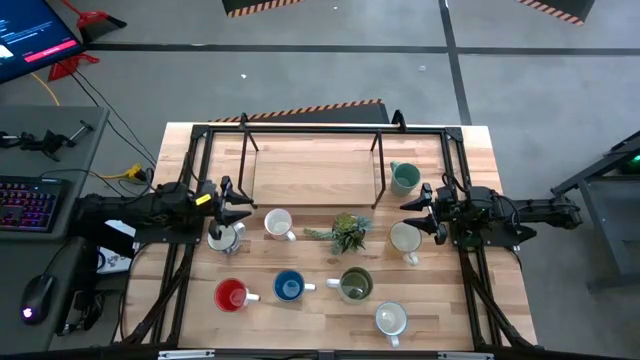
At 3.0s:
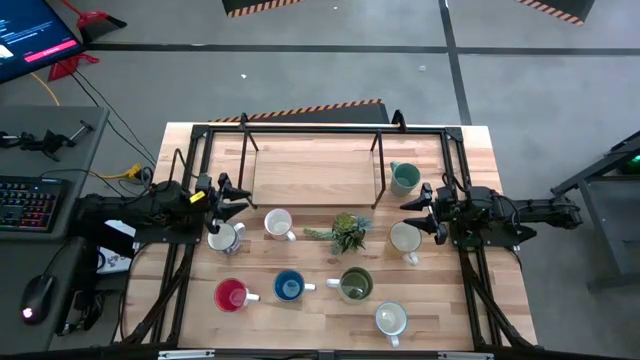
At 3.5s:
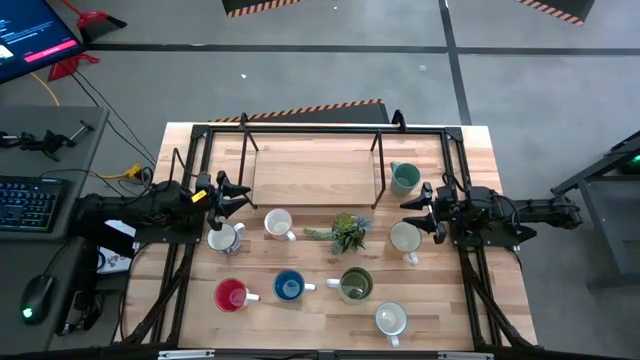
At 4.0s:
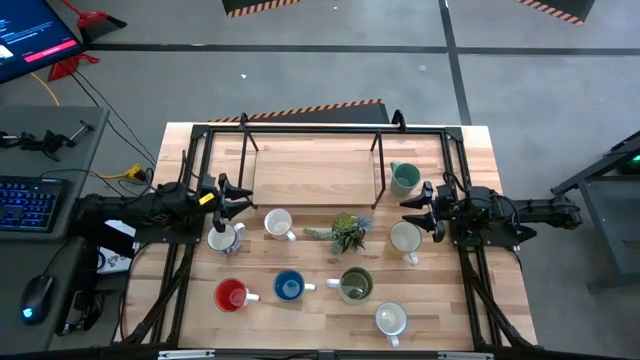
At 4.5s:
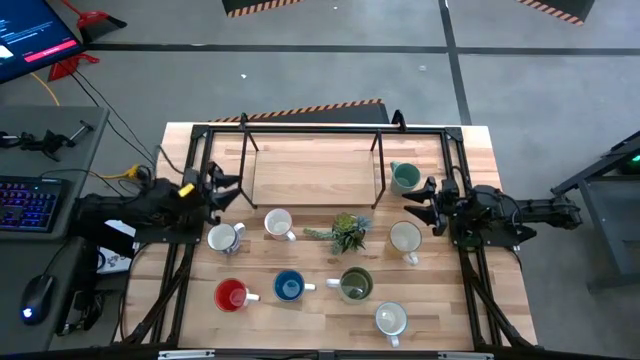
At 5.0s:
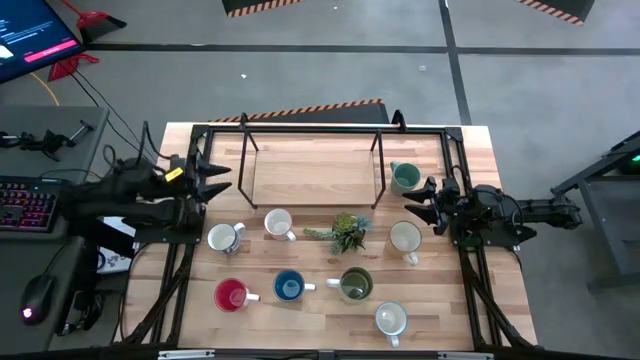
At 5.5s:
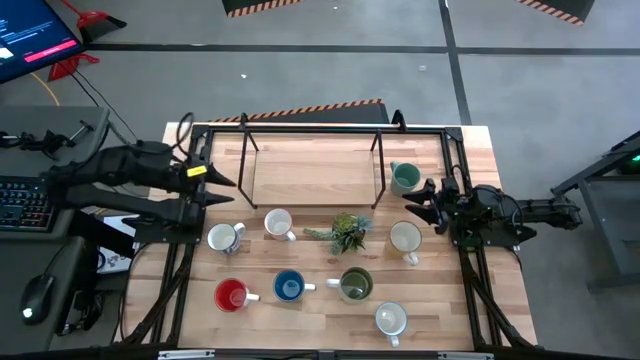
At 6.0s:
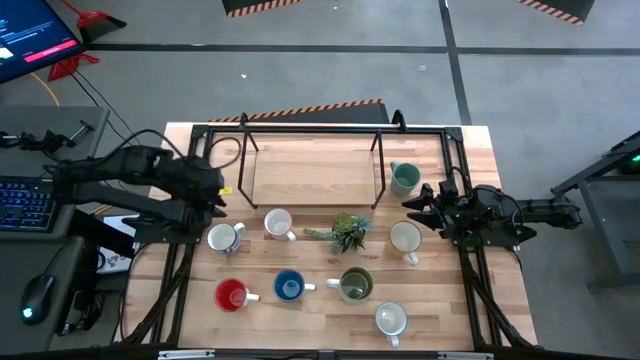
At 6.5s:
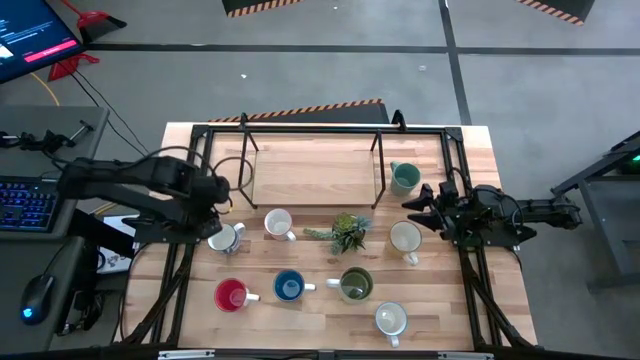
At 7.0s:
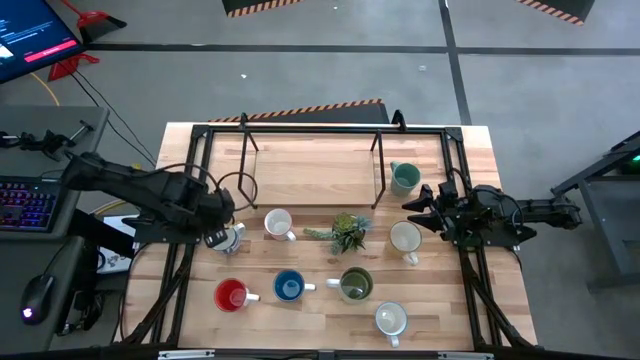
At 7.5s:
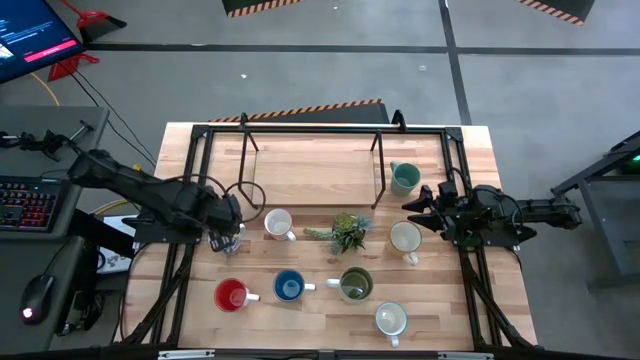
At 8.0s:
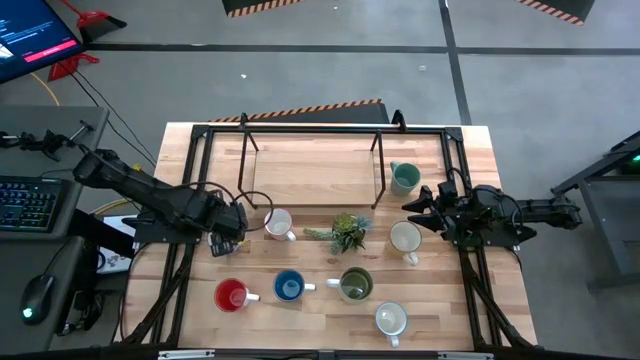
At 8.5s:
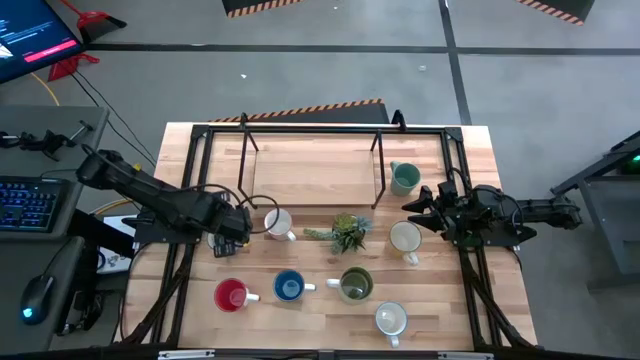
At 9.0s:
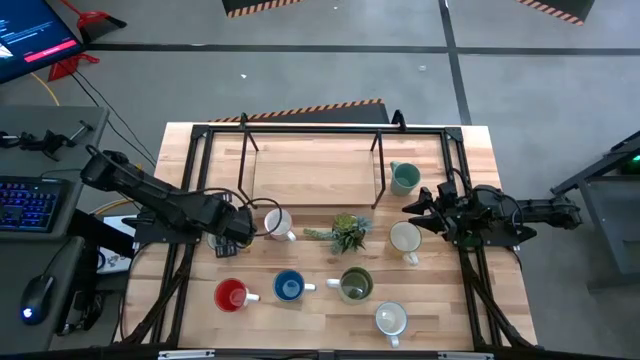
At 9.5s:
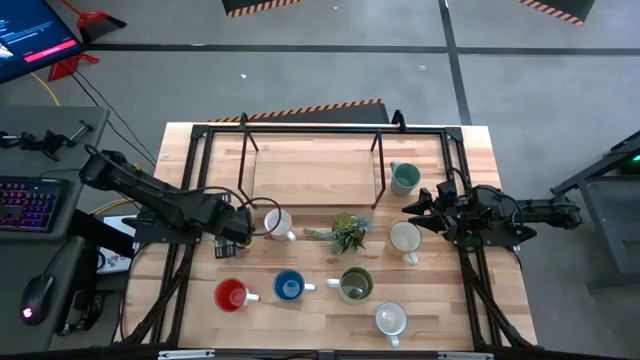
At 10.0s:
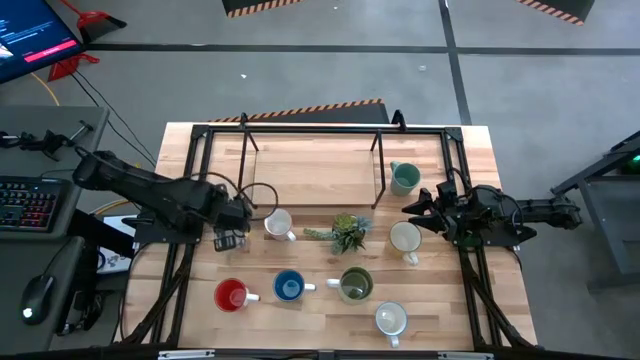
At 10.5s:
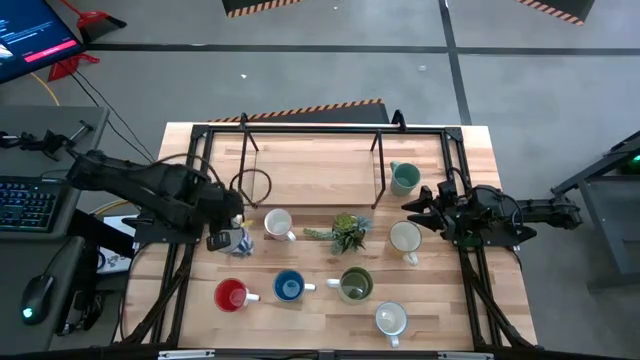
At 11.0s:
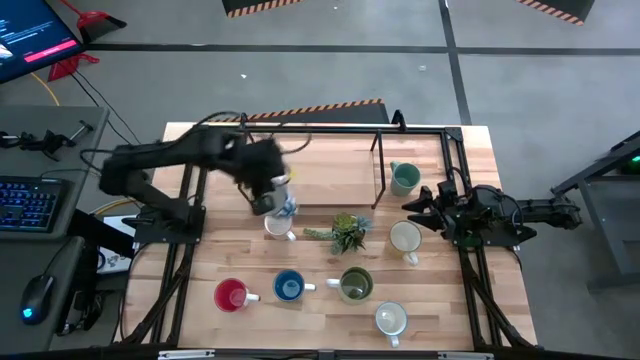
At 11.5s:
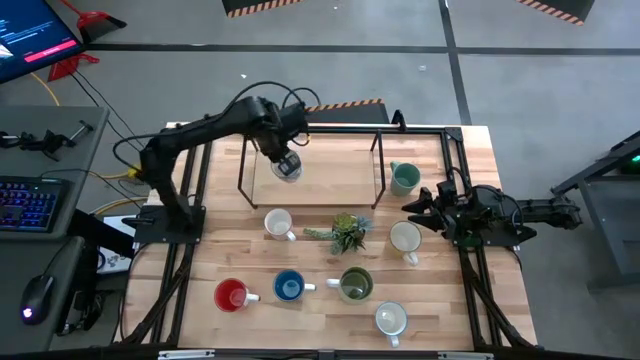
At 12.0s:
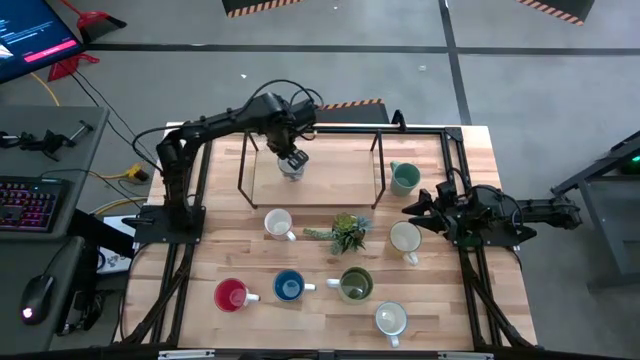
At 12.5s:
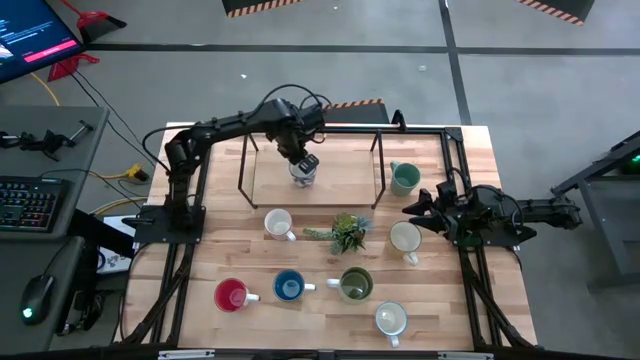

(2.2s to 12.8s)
Task: Place coffee mugs
Put the blue patterned mug on the shelf

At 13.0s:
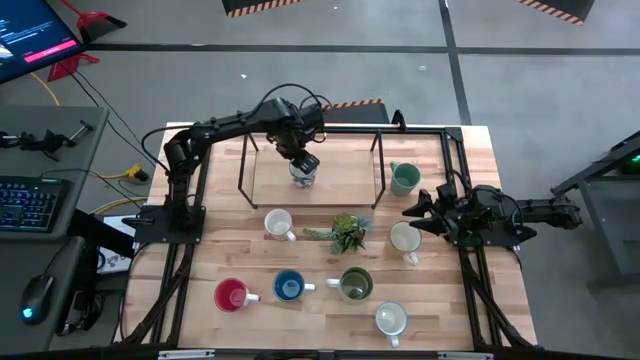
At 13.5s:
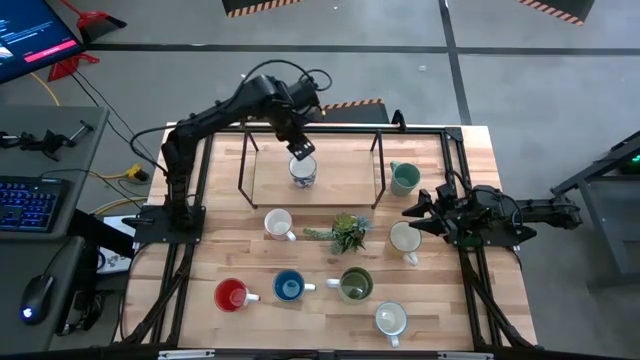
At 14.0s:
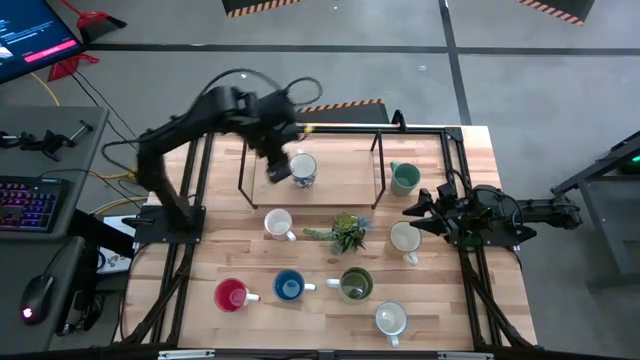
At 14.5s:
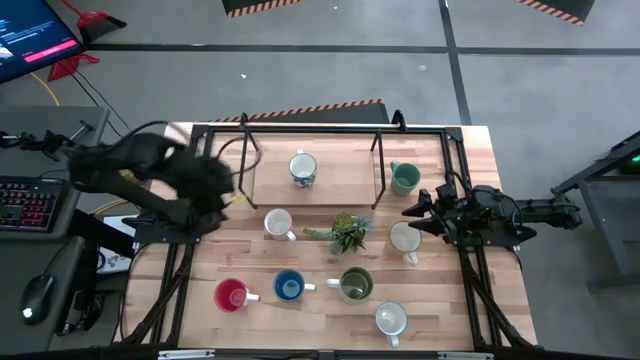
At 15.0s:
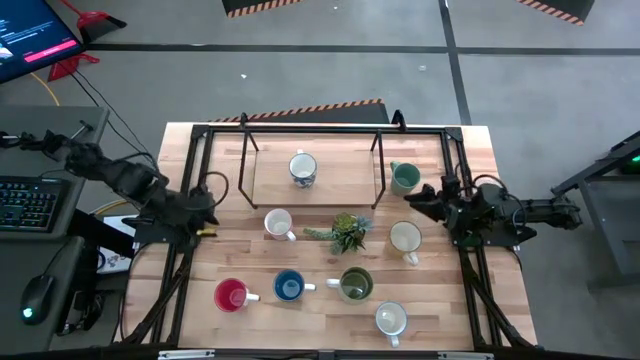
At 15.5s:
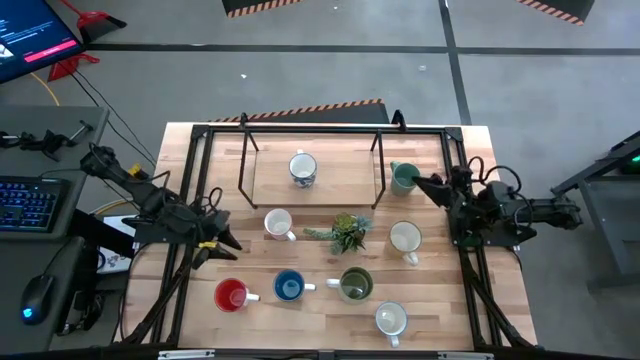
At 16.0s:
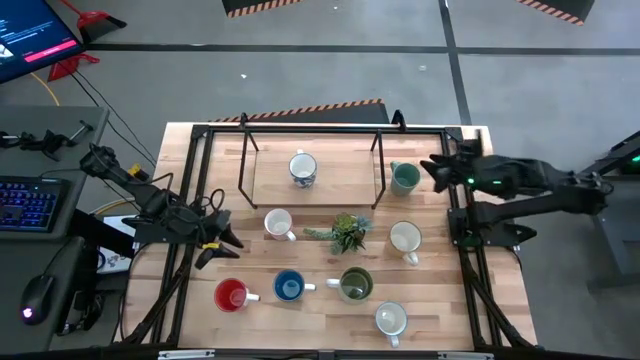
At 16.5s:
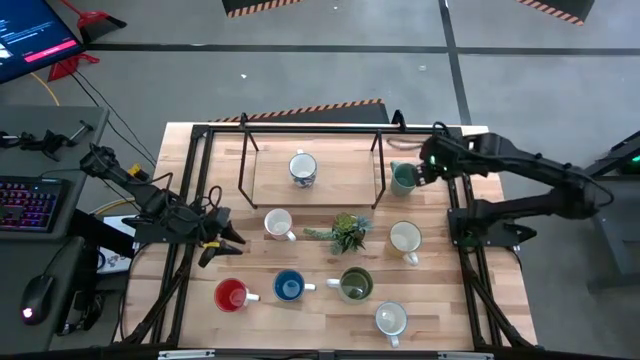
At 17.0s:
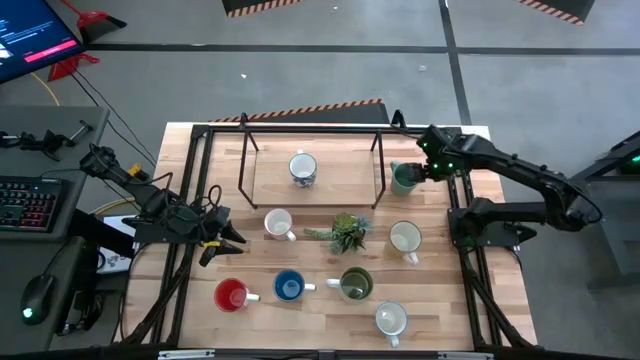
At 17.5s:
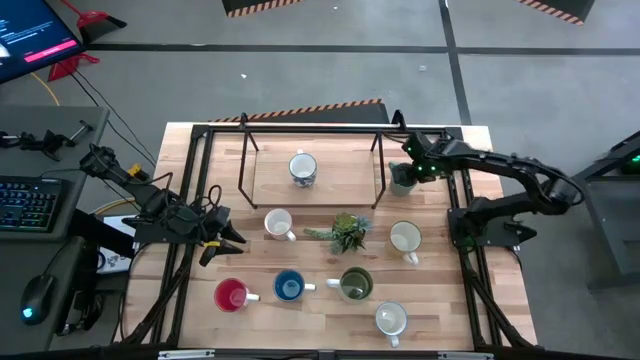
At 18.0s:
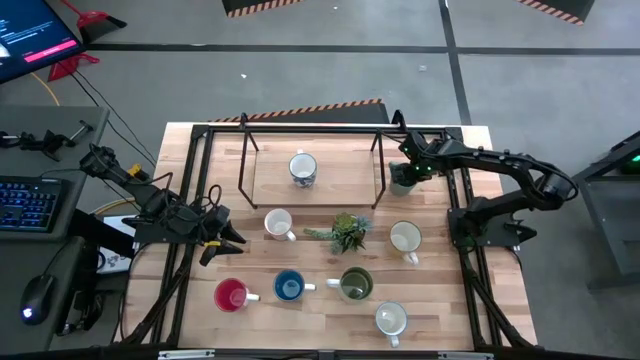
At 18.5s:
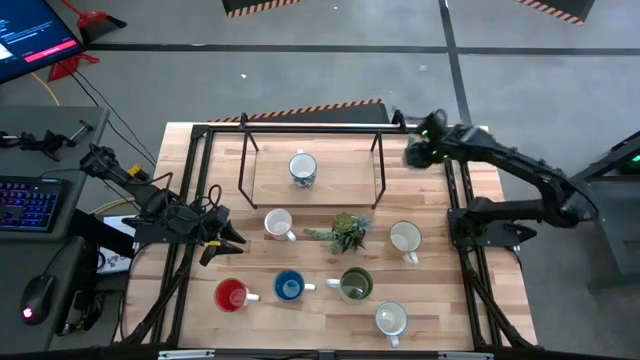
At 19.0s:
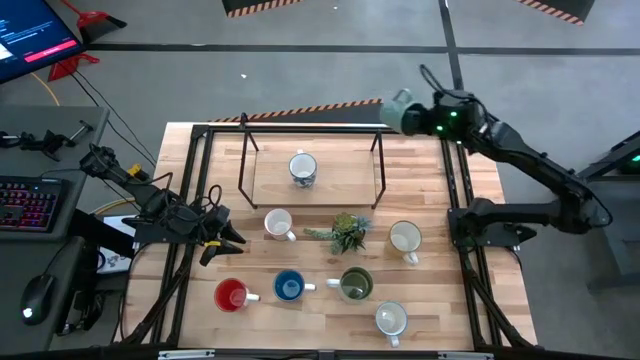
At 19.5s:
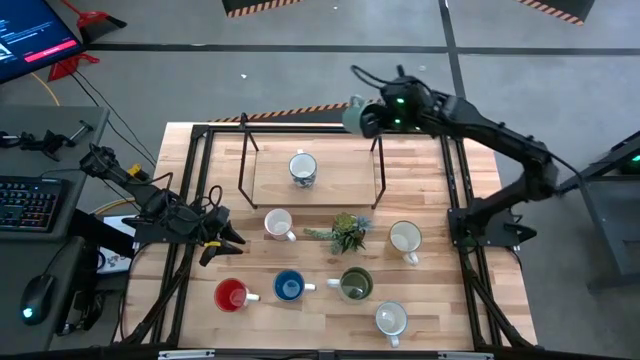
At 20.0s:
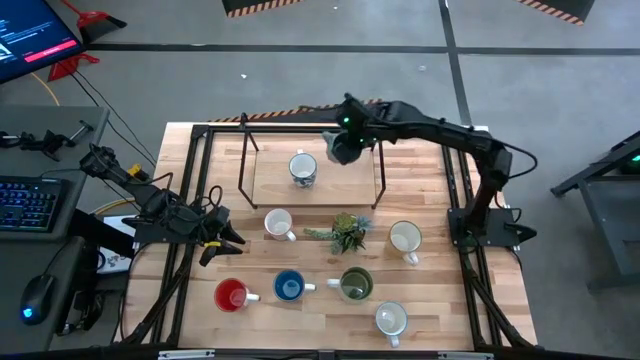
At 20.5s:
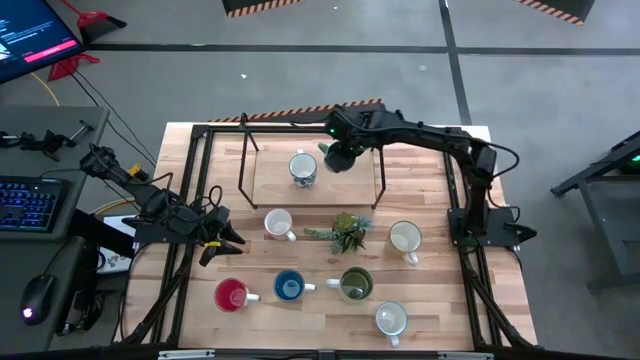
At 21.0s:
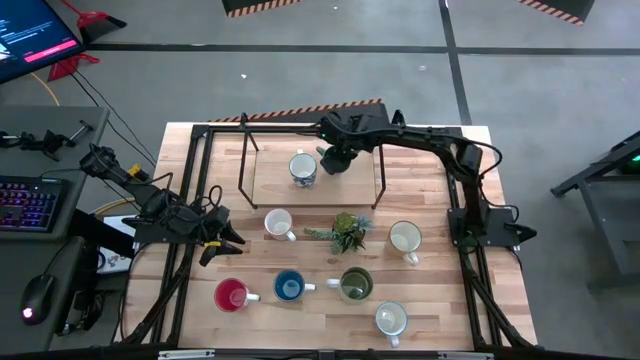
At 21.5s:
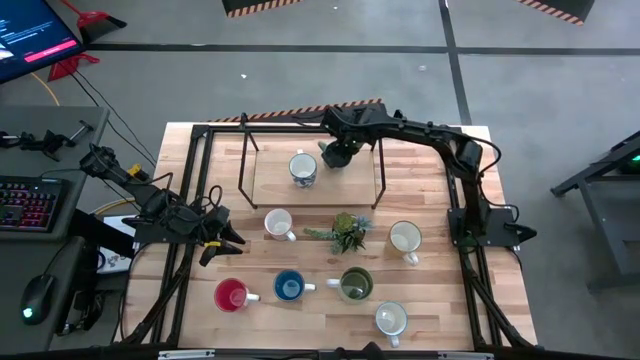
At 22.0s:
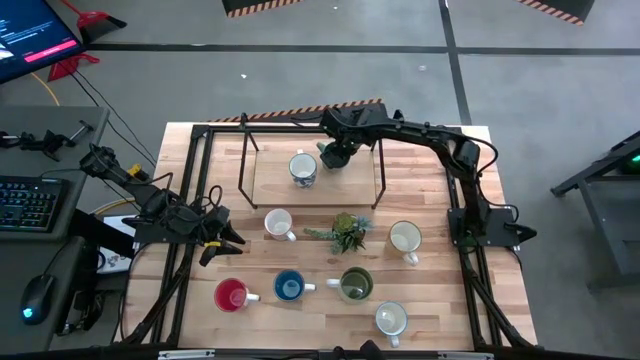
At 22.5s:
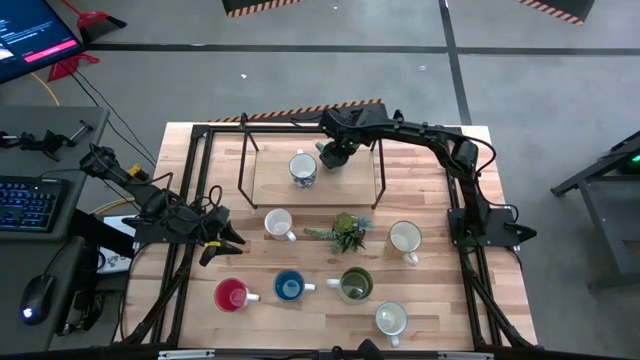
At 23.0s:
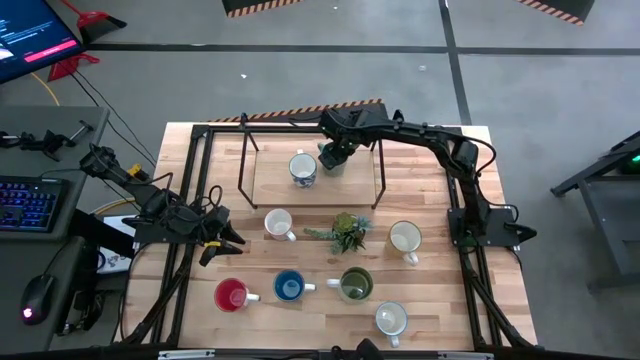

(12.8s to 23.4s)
Put the green mug on the shelf
